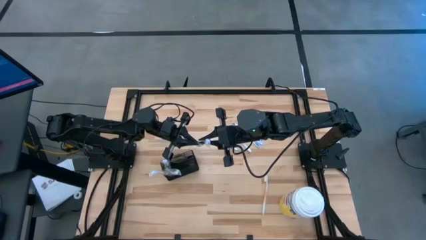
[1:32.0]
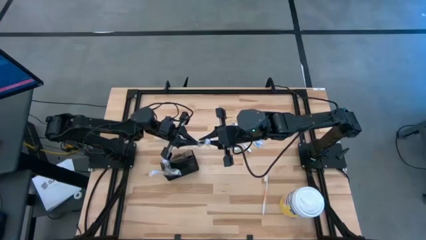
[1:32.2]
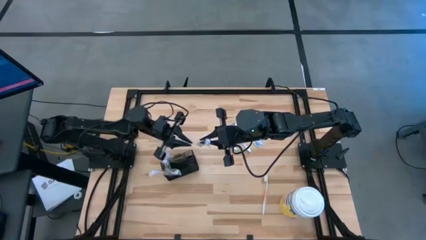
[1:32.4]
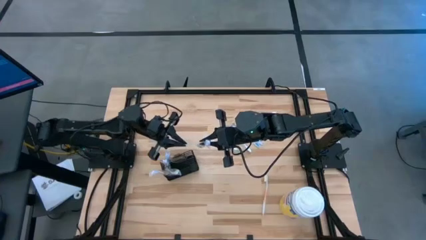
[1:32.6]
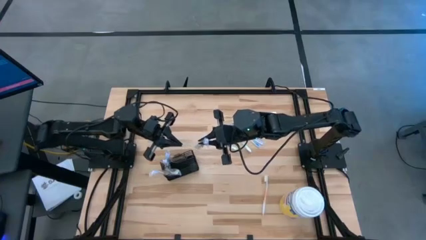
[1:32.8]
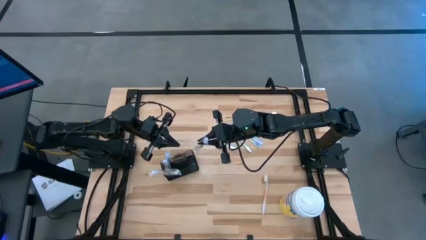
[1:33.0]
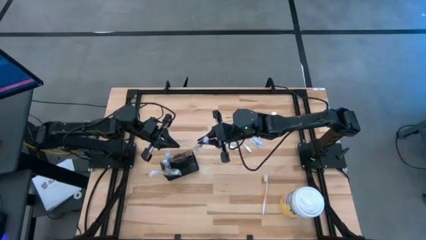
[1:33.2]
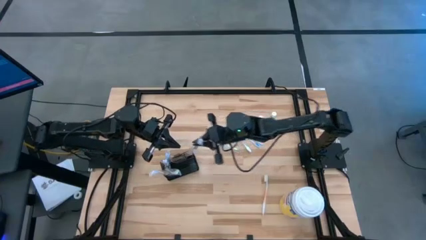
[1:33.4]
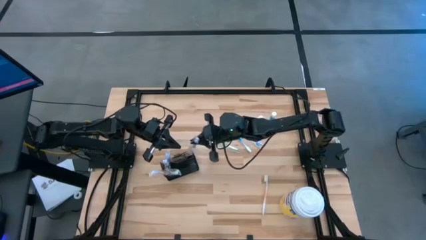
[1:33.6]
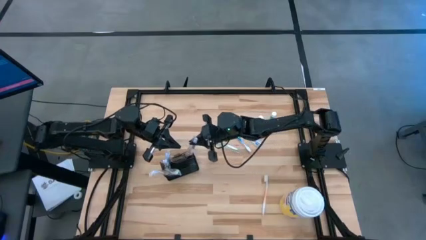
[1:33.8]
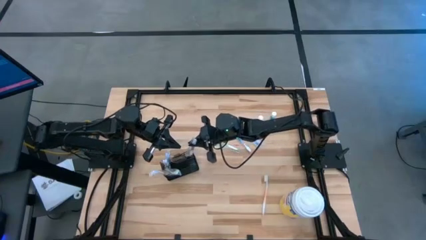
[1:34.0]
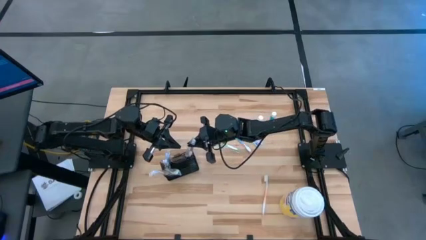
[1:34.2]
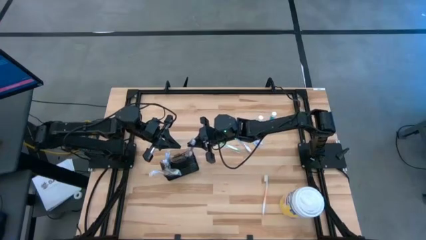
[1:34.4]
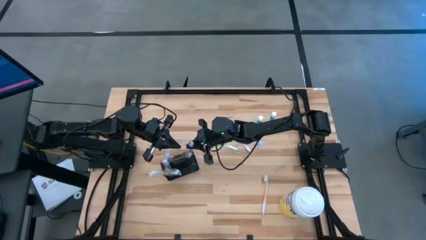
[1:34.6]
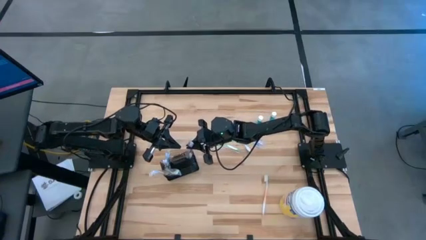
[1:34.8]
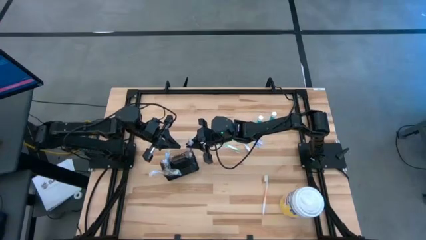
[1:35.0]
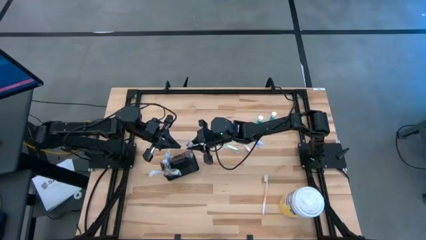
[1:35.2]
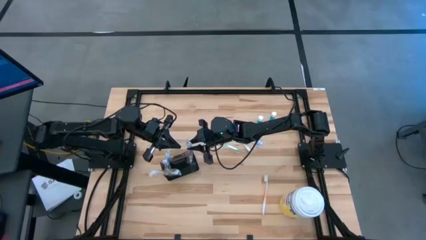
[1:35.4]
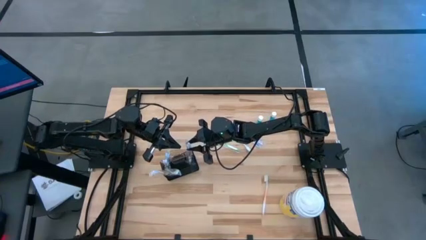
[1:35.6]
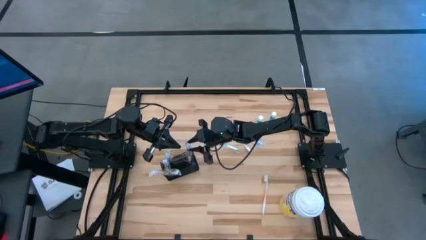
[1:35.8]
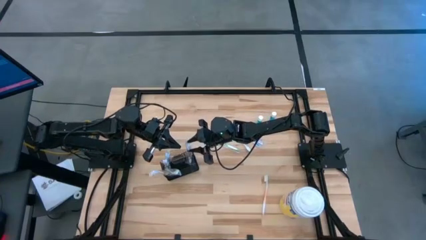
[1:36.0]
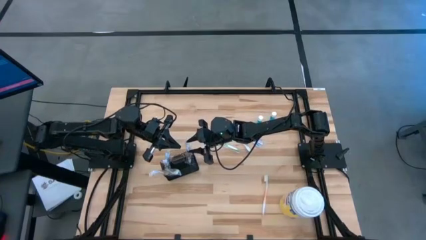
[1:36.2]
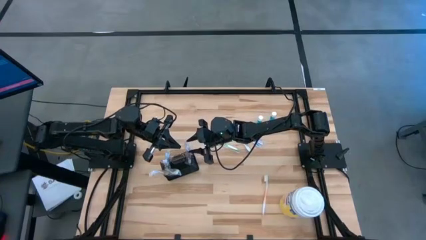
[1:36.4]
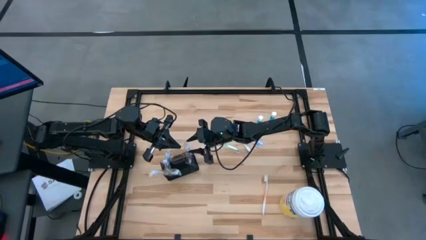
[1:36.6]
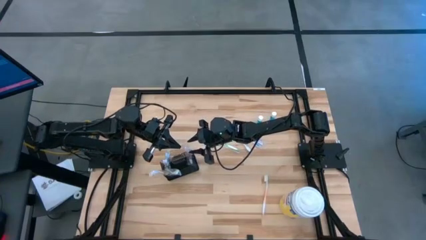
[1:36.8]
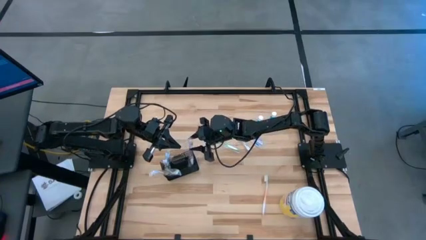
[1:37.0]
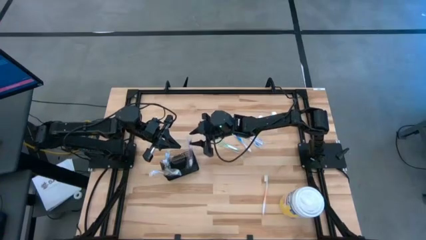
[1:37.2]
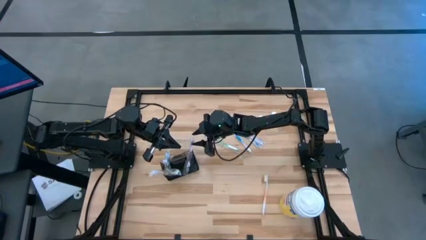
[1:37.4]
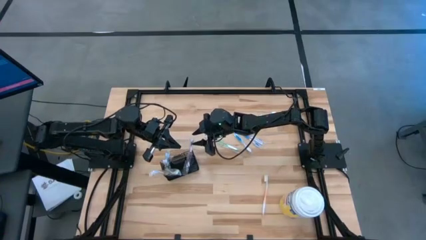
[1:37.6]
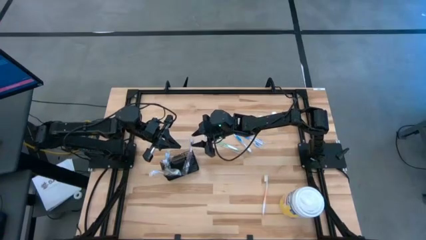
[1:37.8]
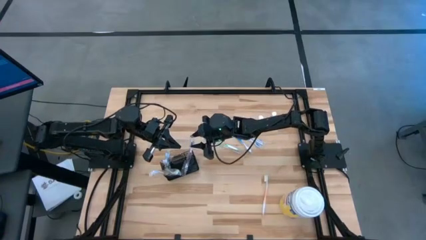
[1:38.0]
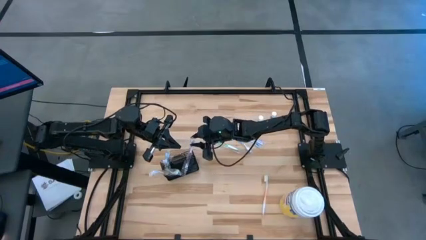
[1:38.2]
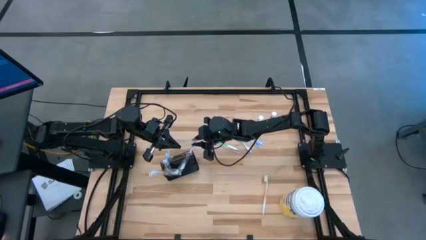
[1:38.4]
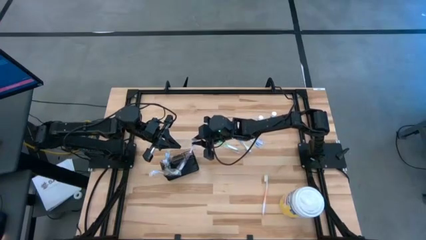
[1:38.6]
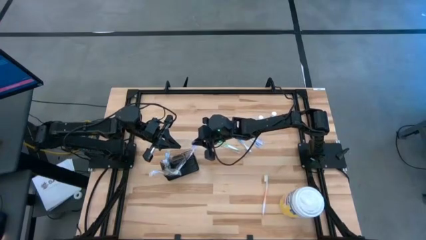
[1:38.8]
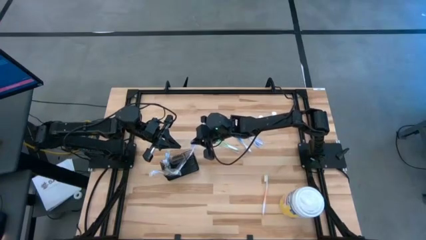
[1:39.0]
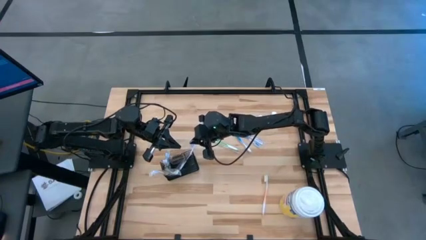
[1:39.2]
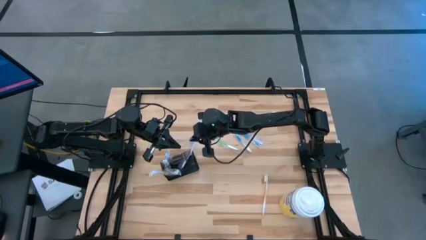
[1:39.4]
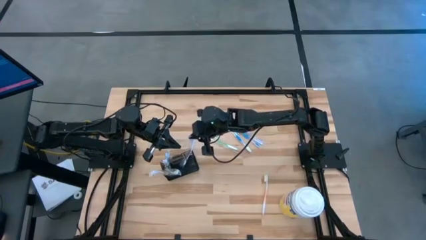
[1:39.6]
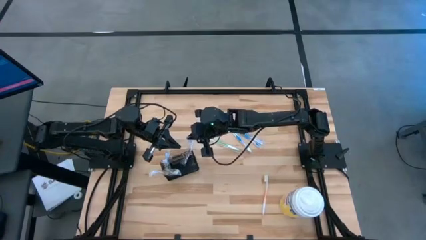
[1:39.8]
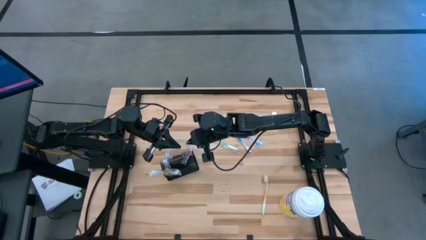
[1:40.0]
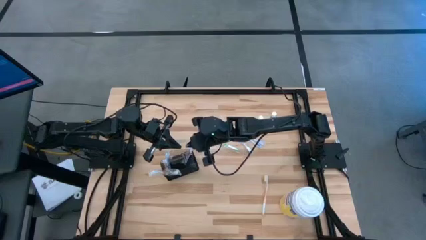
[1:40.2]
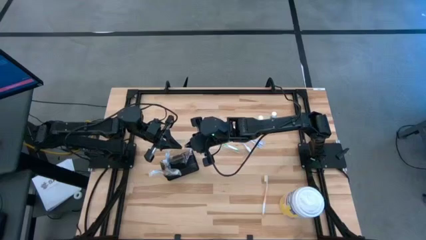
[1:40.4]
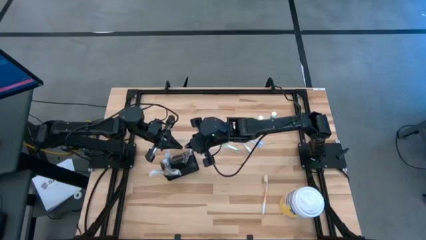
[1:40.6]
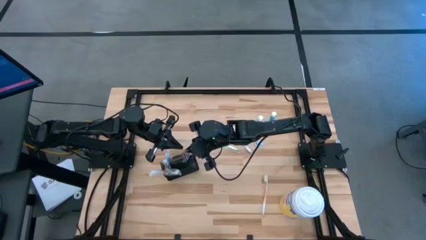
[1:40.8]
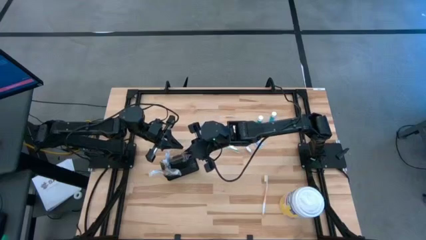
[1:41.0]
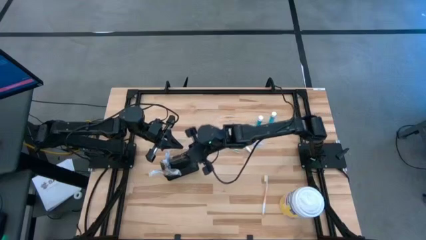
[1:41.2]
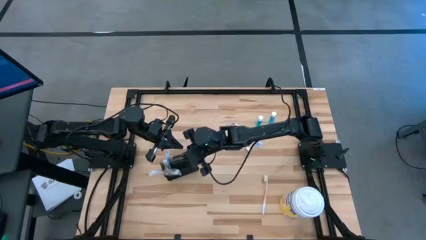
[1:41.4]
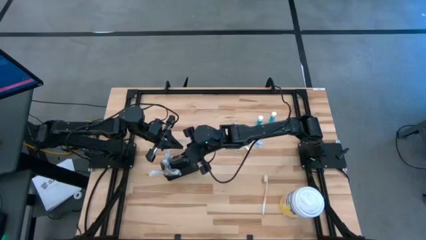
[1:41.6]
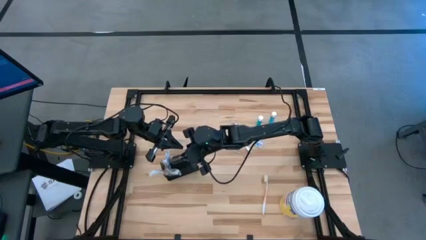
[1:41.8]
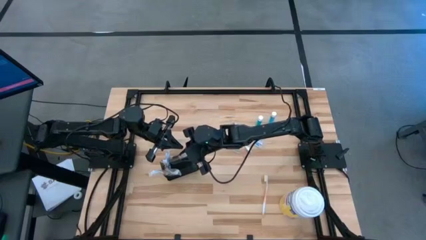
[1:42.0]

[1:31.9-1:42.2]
Task: Pick & Place toothbrushing station
Put the left purple toothbrush into the top right section of the mesh organizer

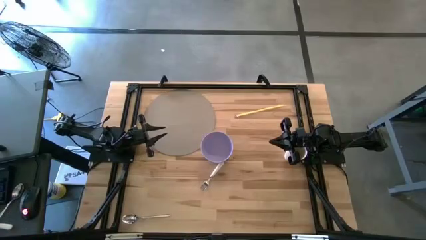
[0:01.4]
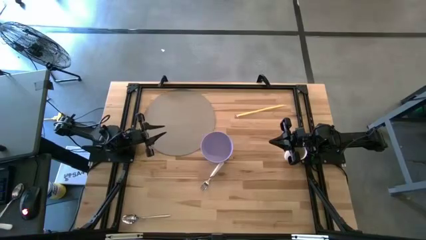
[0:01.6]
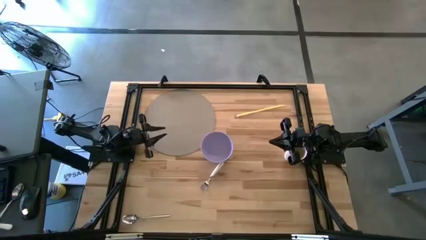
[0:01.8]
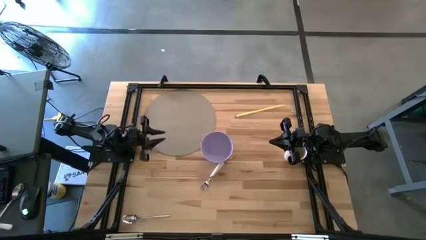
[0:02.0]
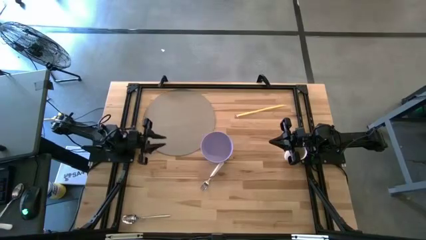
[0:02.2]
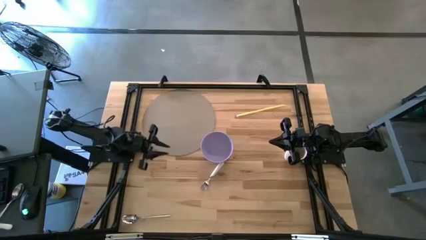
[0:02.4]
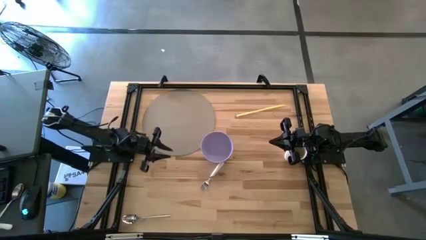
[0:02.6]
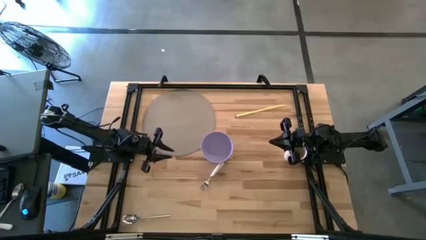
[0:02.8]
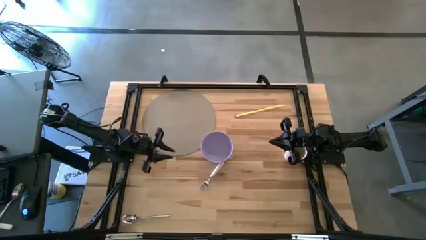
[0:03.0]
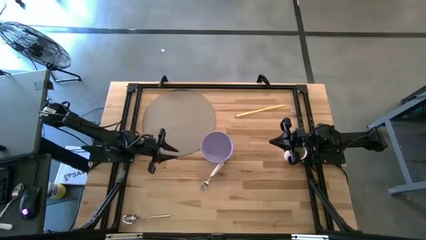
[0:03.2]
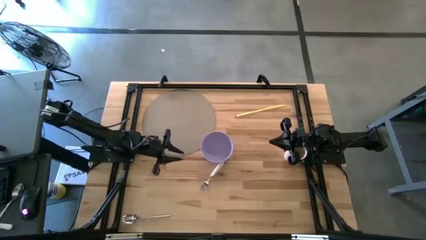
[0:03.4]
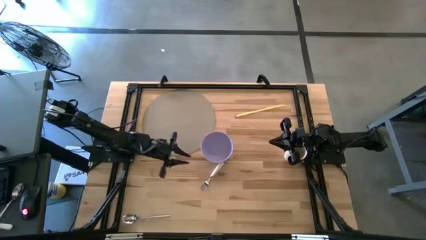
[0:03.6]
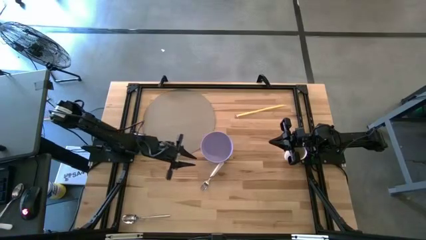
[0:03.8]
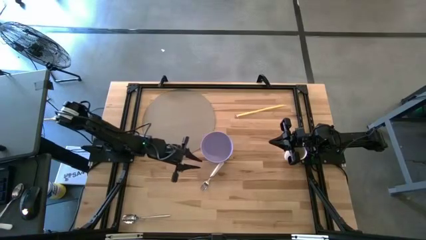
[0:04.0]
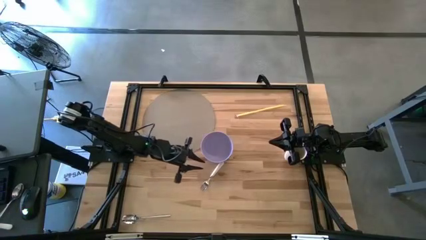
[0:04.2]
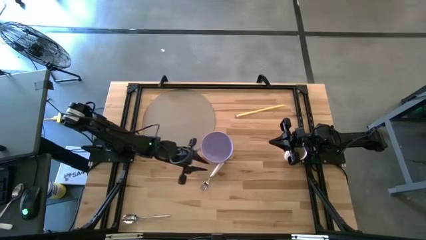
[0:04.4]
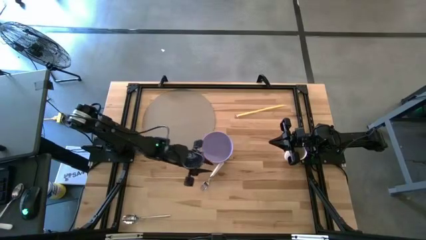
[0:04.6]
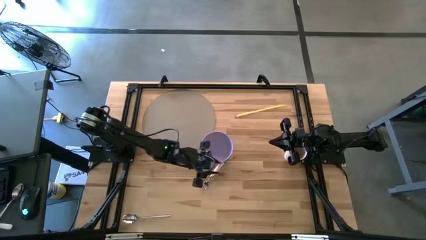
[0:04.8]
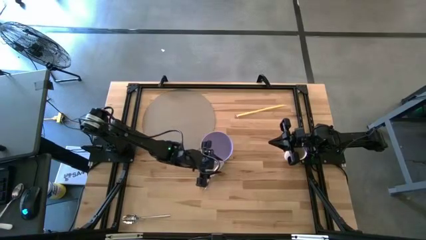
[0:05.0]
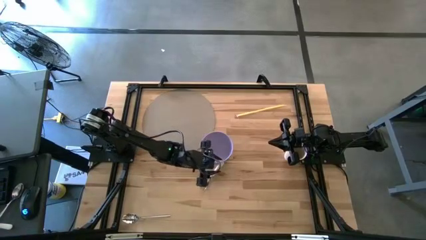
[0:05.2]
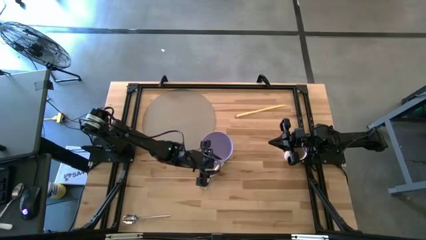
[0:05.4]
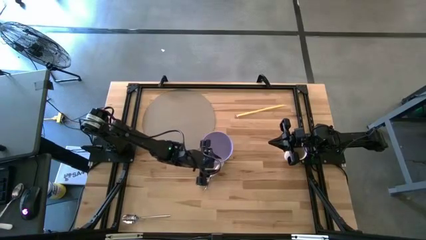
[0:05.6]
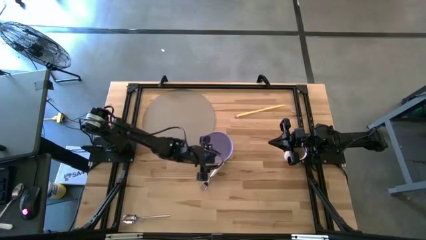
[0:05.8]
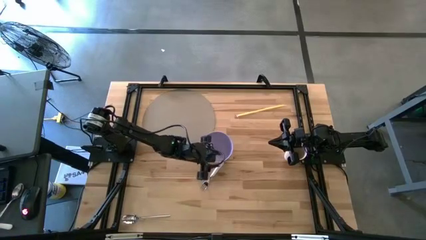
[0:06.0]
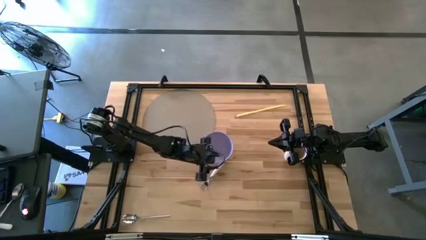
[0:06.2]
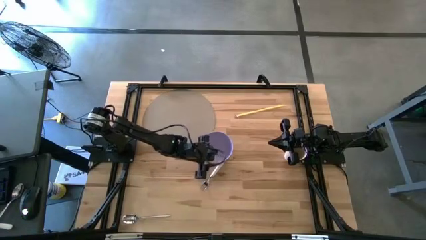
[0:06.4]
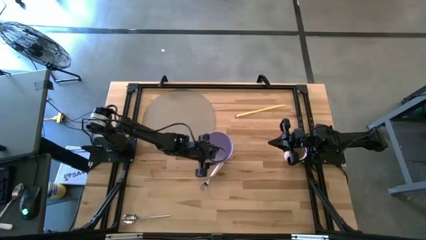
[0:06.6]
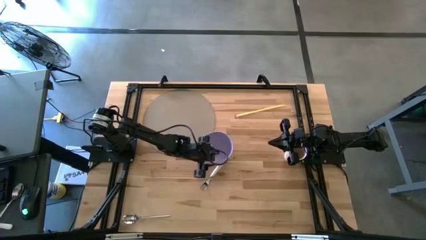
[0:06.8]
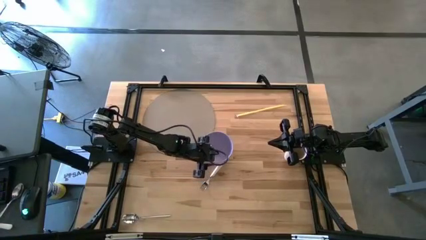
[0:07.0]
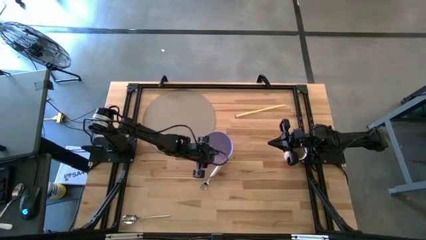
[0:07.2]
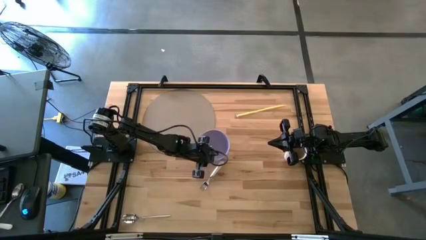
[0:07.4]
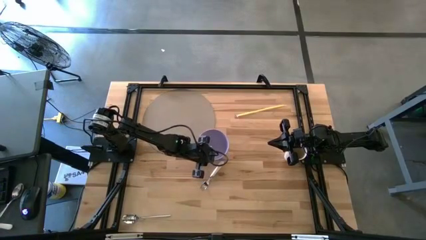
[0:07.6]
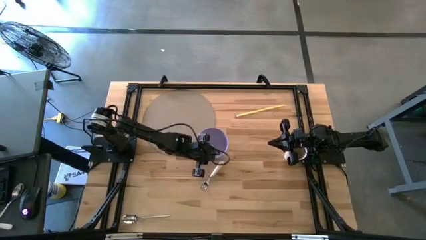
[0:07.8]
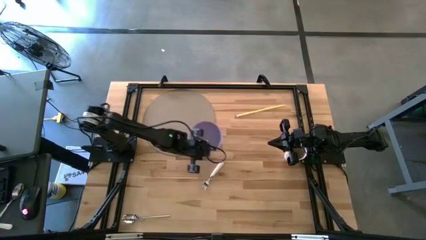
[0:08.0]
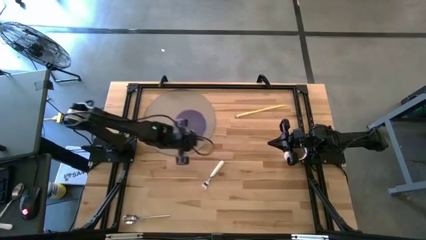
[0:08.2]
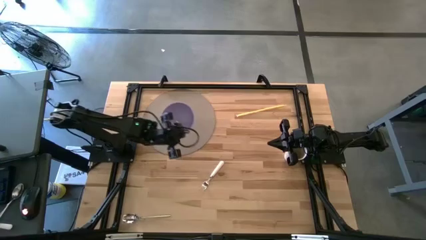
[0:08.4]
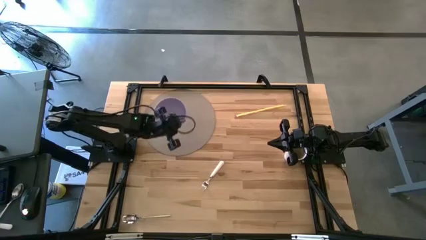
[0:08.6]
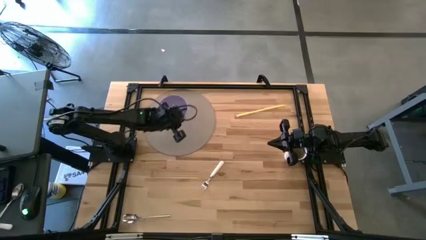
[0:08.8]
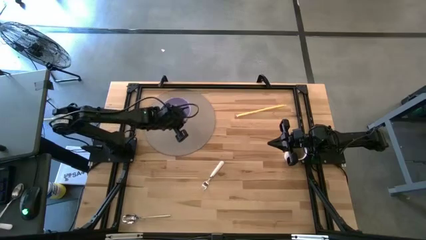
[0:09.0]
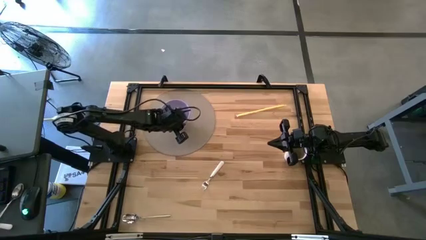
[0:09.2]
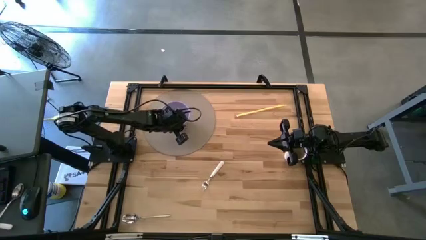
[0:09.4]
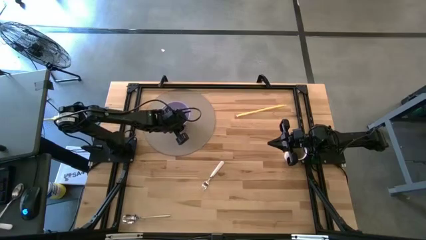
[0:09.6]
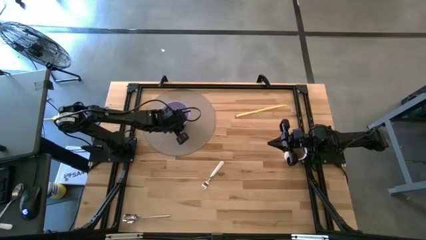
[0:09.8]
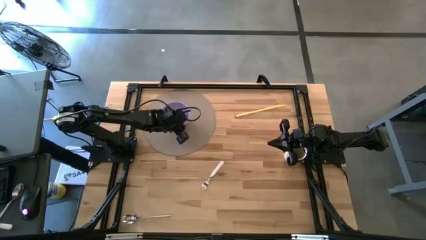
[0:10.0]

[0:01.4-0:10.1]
Task: Pick & Place Utensil
Put the violet bowl on the brown mat
